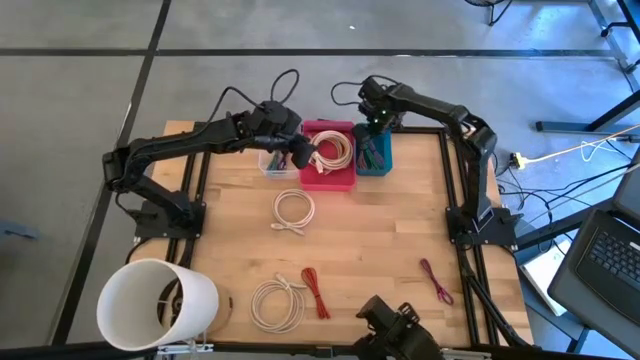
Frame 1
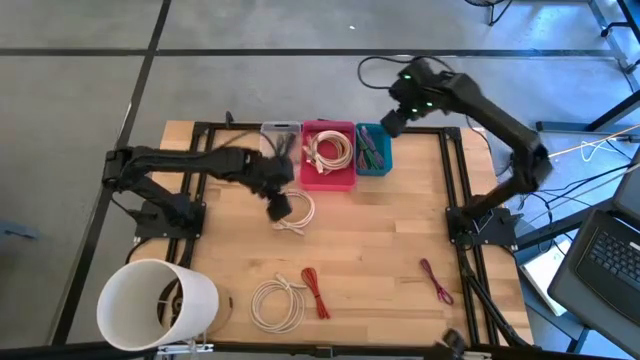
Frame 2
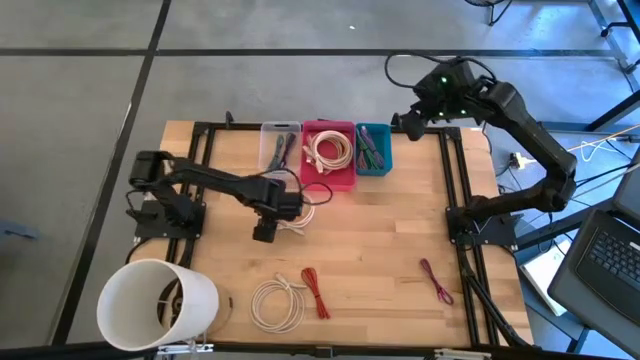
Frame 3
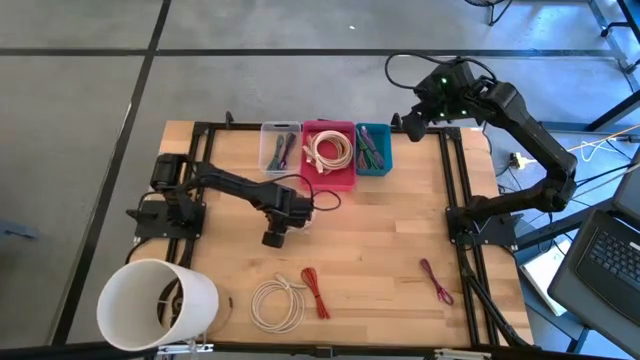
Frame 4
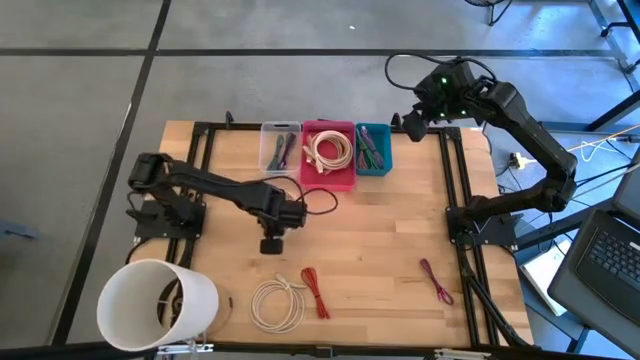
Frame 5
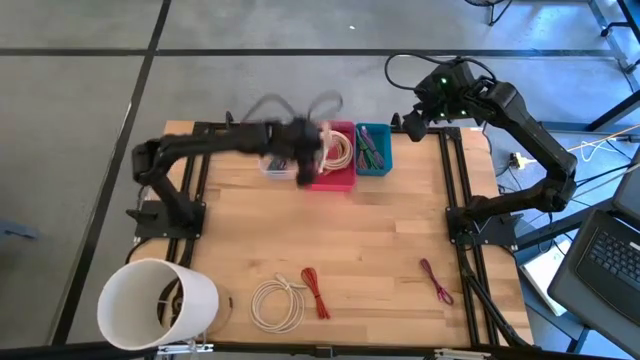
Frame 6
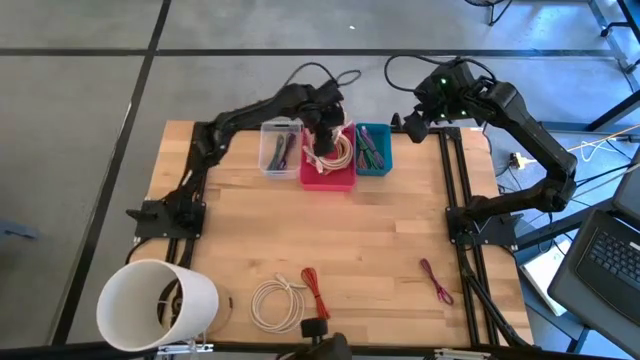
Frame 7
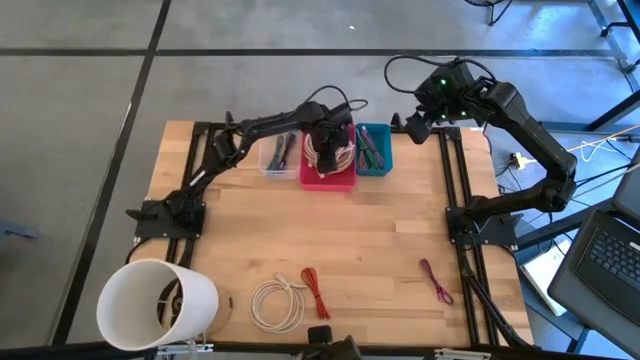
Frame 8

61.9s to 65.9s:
Task: Pick & Place USB Port
Put the white USB cable into the red bin

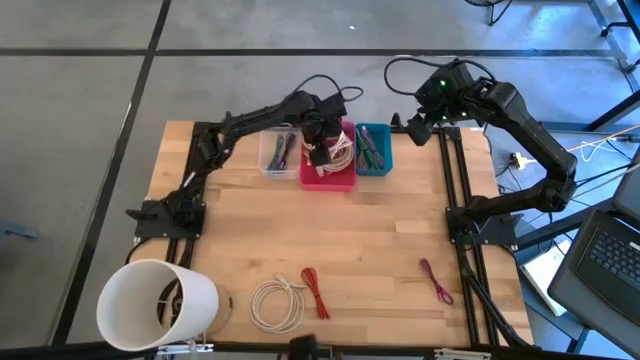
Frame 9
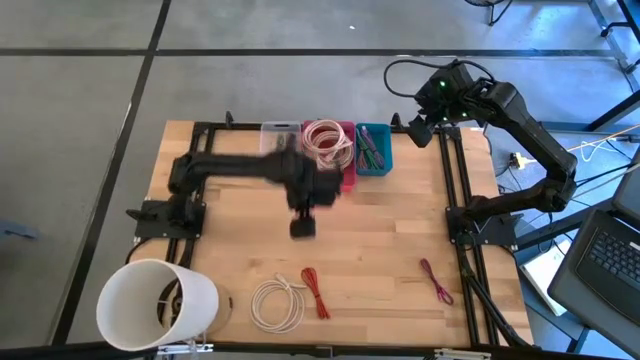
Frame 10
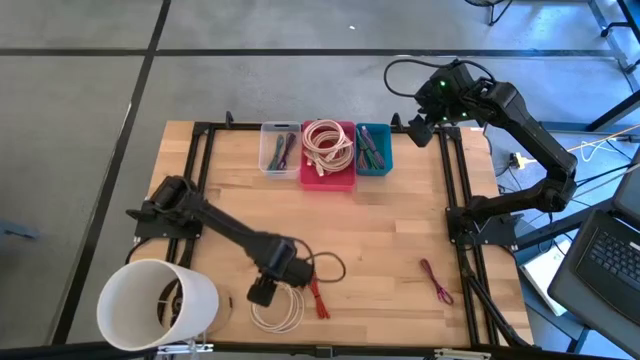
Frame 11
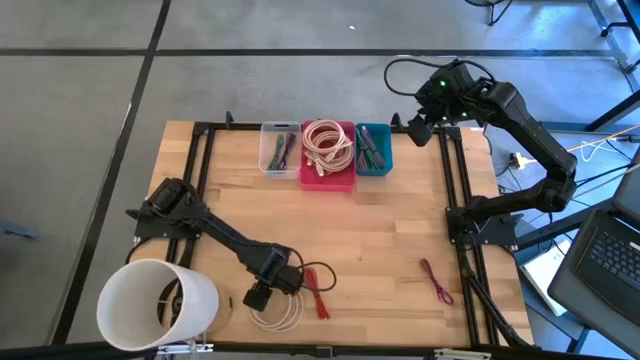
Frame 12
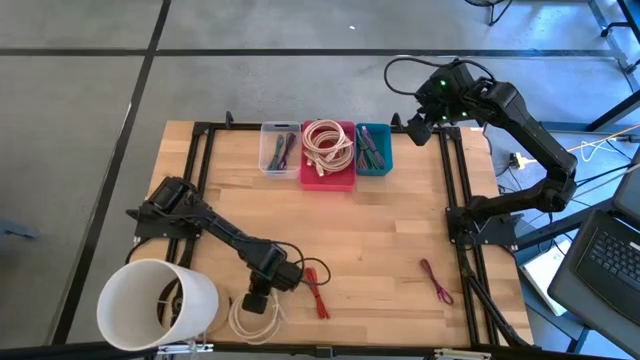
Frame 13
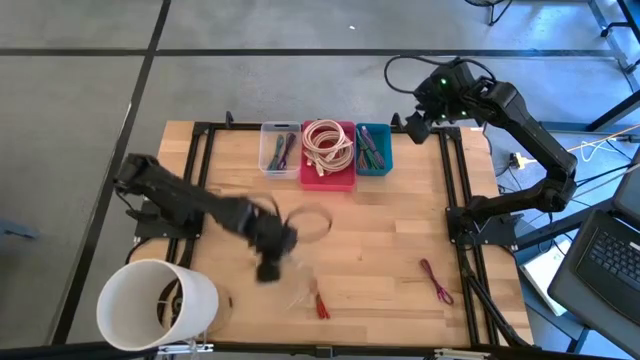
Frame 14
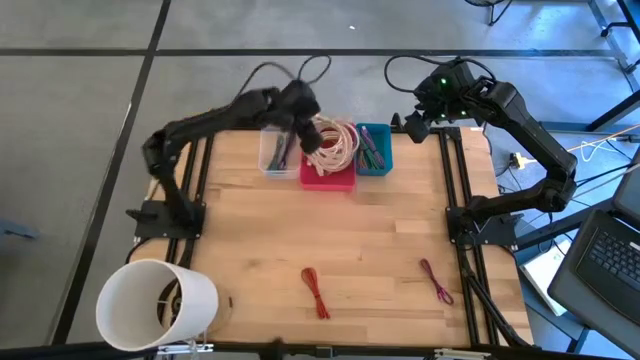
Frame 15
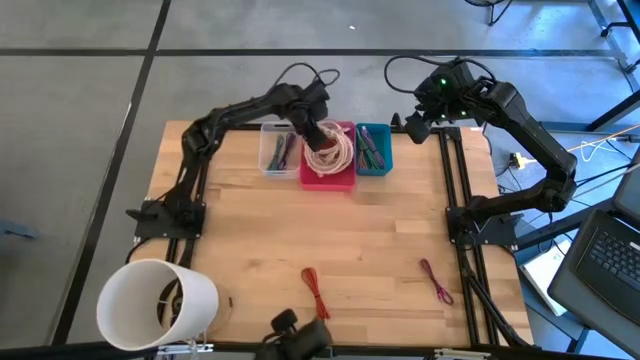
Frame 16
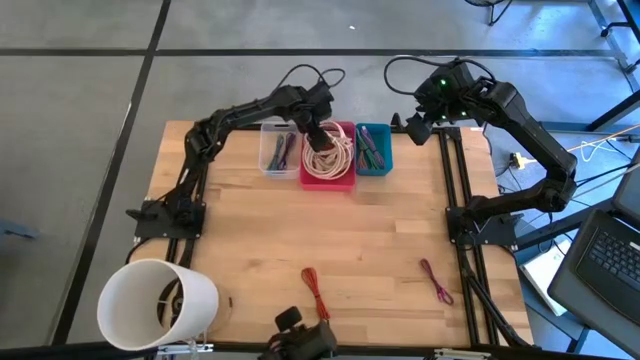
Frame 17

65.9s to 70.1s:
Put the white USB cable into the red bin

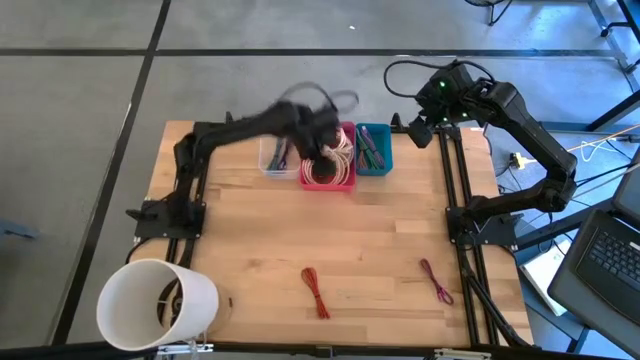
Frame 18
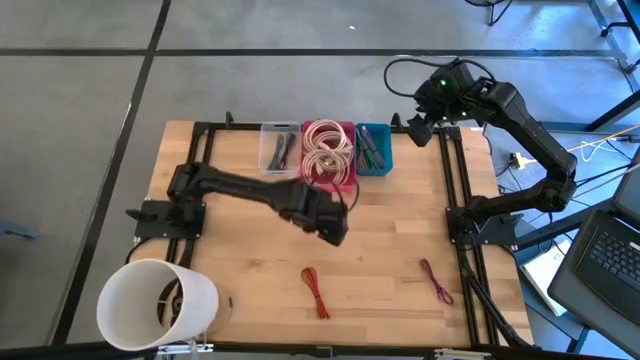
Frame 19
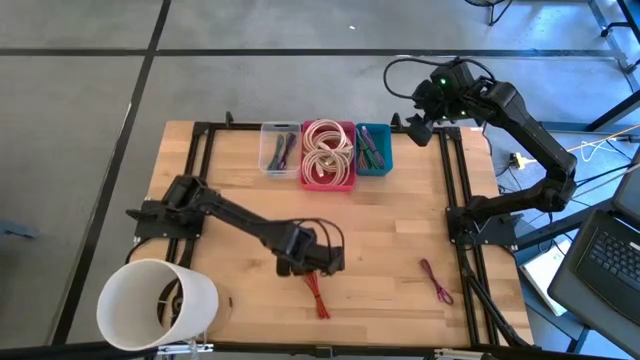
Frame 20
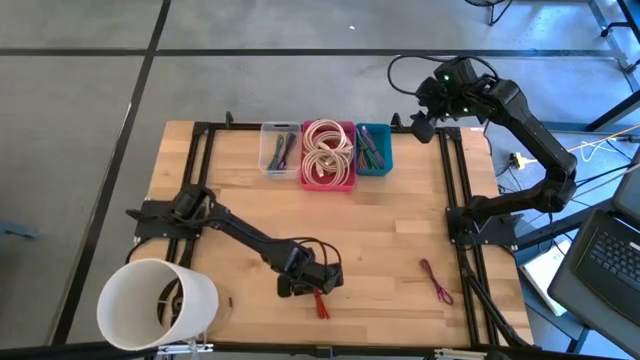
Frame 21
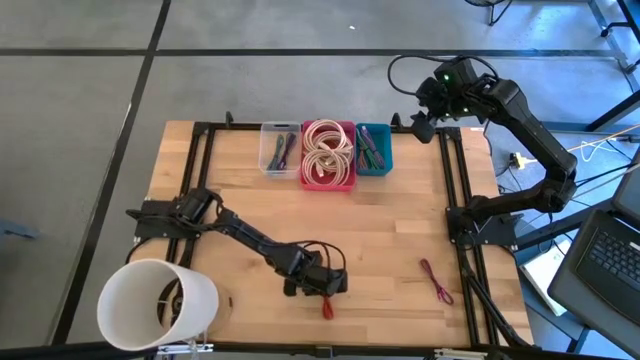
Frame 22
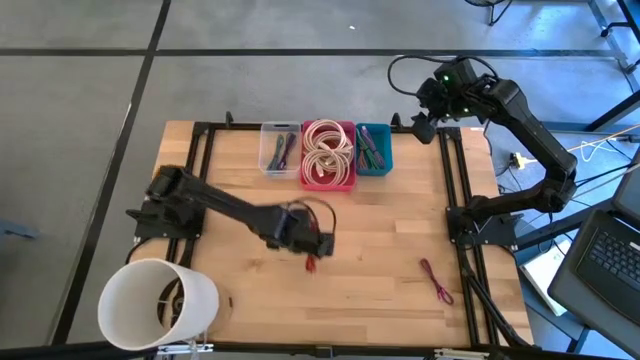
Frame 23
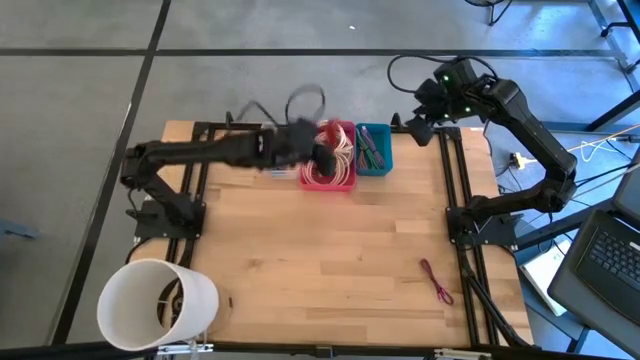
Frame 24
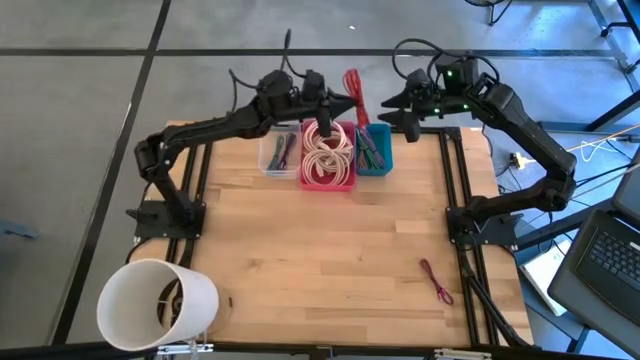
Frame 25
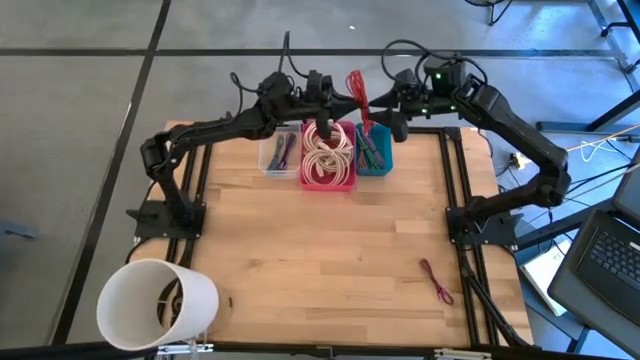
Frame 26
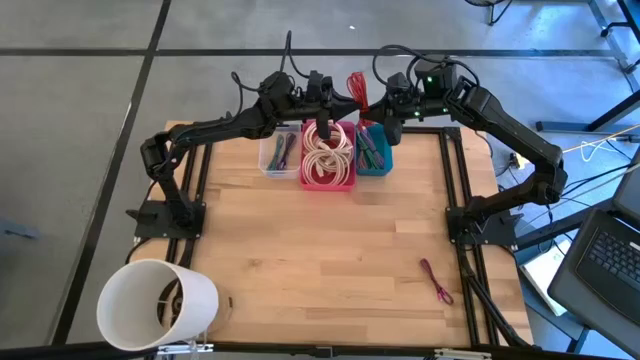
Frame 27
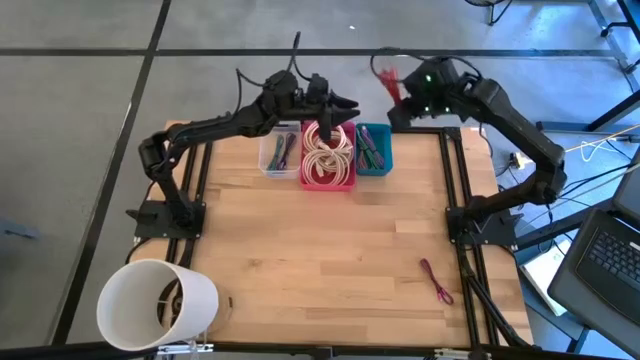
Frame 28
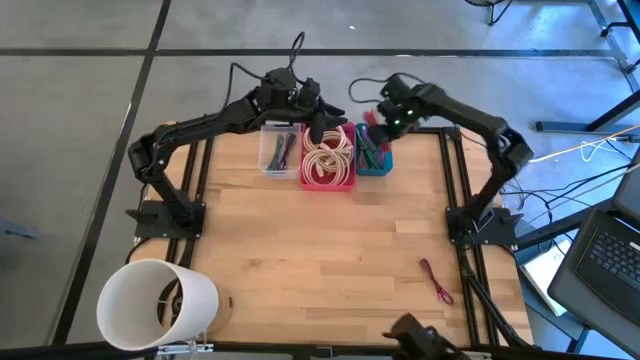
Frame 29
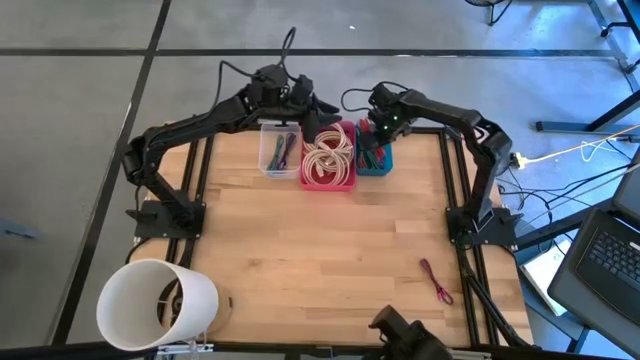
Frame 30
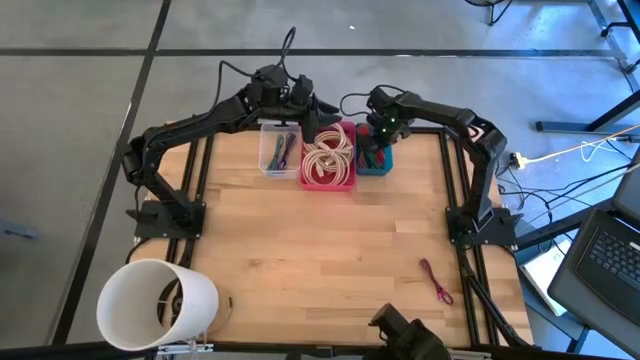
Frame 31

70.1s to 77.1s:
Put the orange USB cable into the blue bin

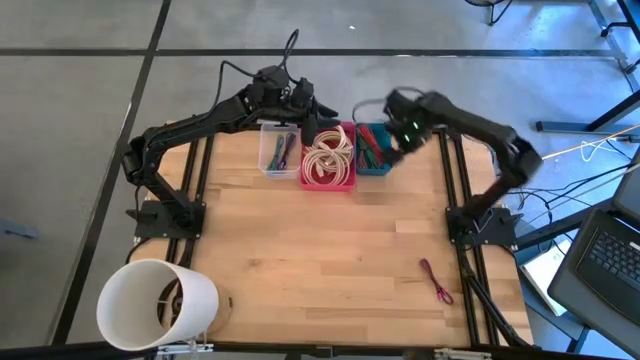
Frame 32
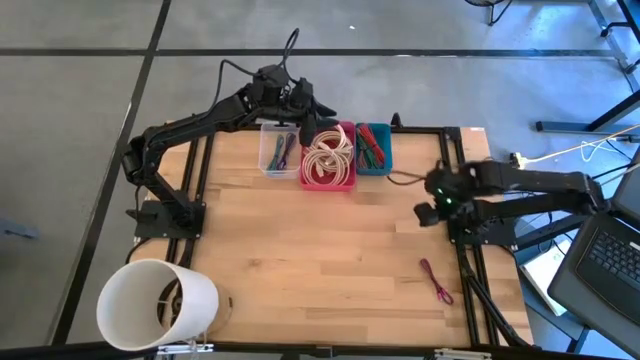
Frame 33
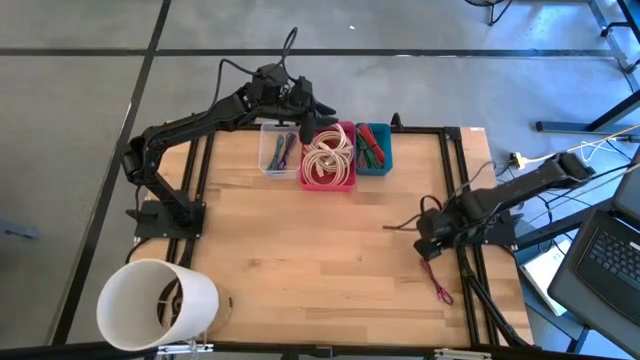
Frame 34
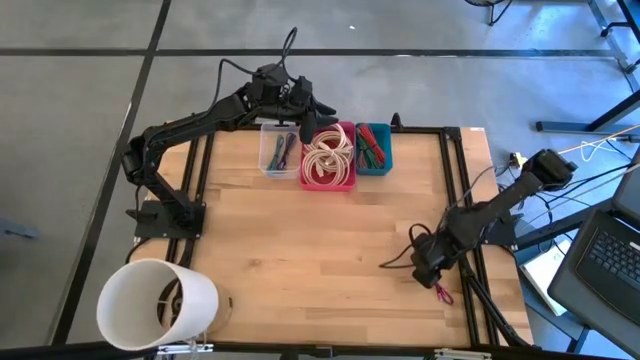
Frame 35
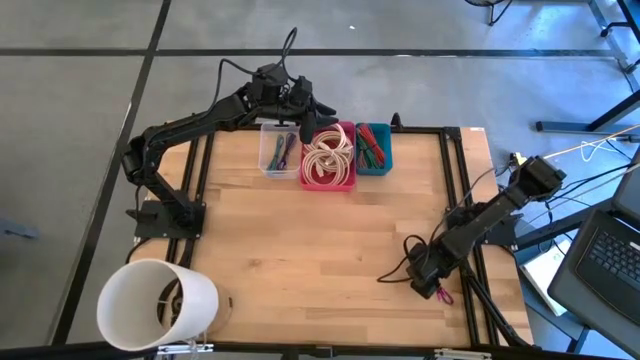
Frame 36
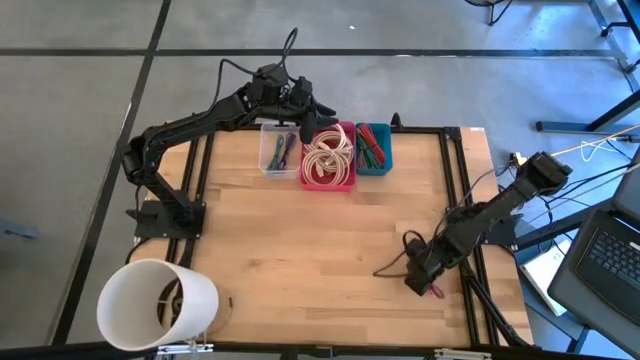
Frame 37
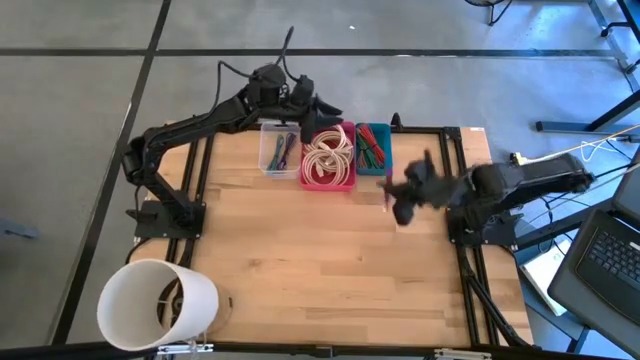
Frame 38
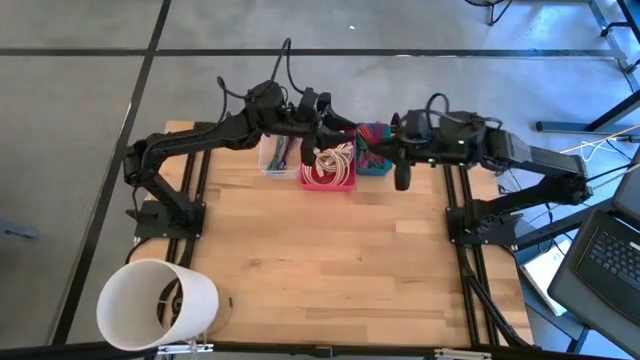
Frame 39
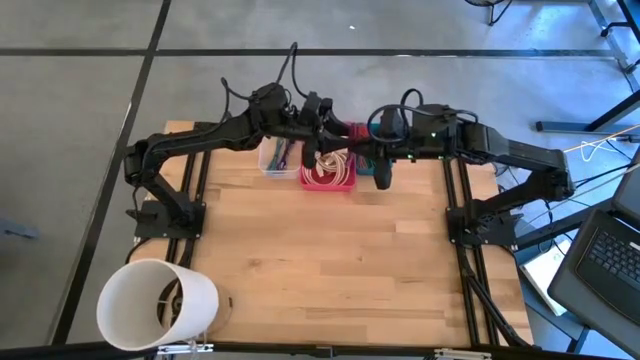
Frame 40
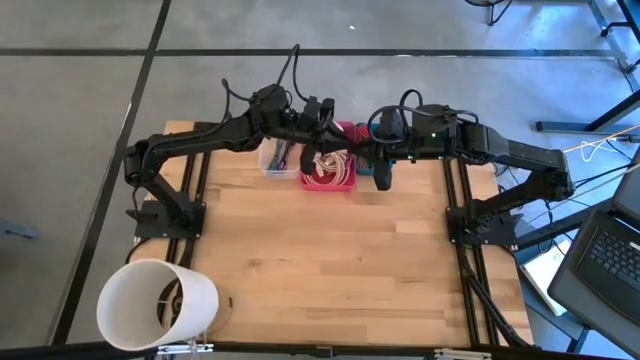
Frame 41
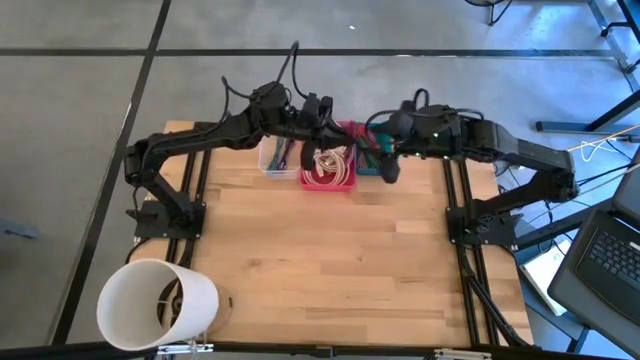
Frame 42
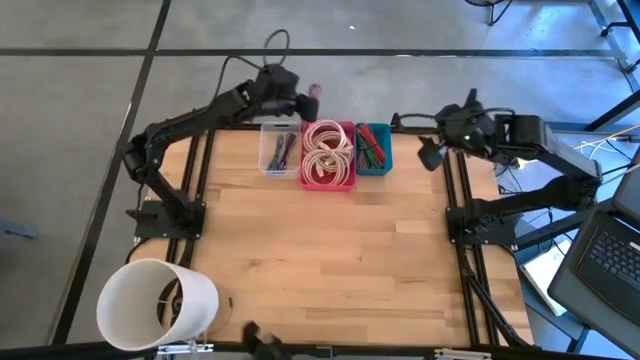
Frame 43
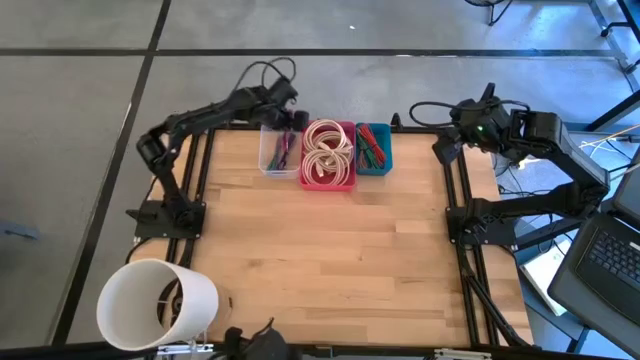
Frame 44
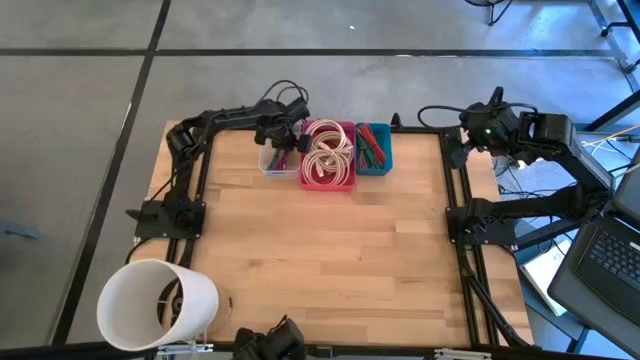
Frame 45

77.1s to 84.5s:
Put the pink patterned USB cable into the transparent bin
